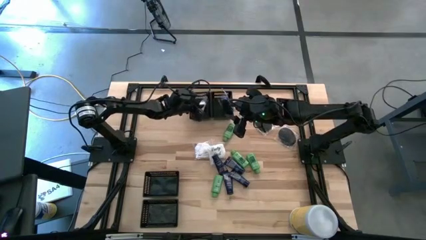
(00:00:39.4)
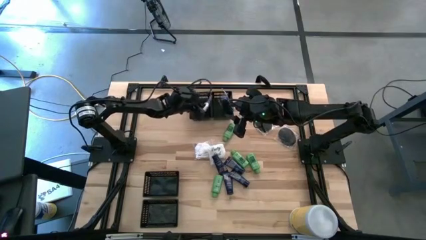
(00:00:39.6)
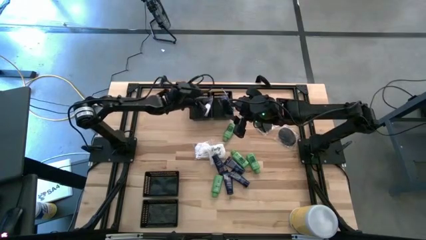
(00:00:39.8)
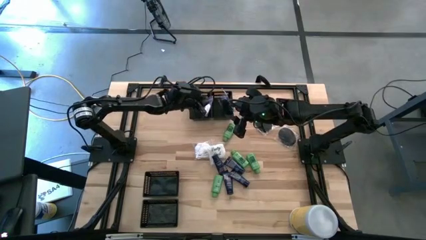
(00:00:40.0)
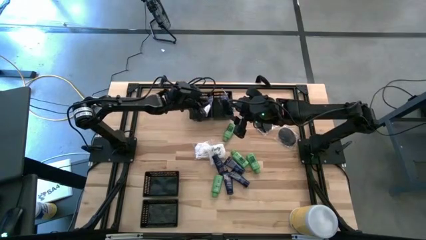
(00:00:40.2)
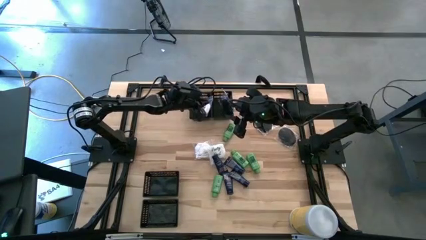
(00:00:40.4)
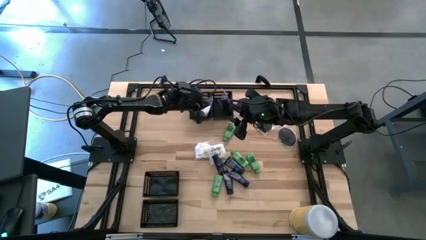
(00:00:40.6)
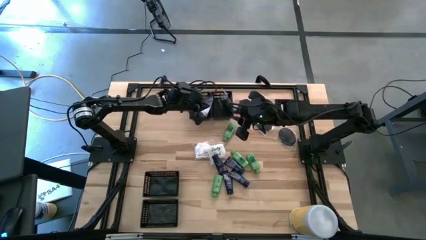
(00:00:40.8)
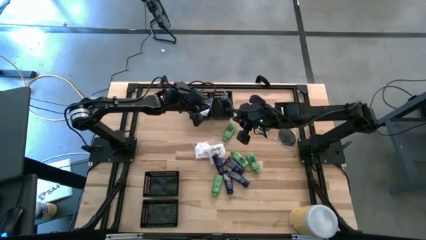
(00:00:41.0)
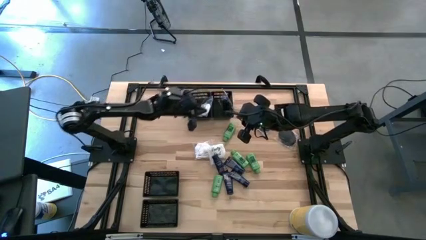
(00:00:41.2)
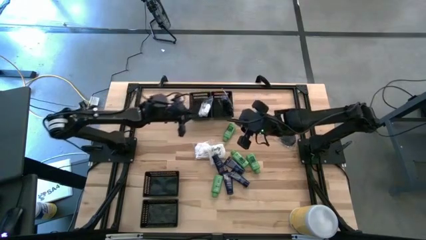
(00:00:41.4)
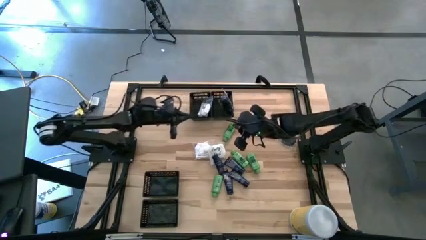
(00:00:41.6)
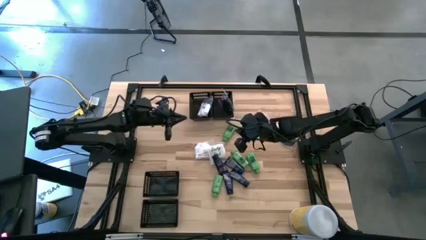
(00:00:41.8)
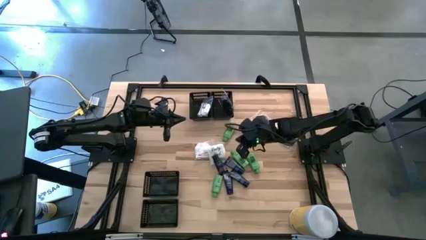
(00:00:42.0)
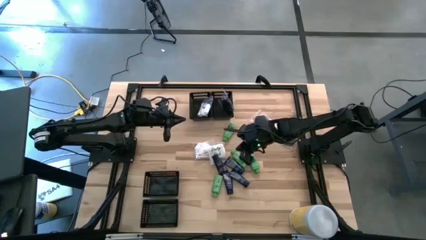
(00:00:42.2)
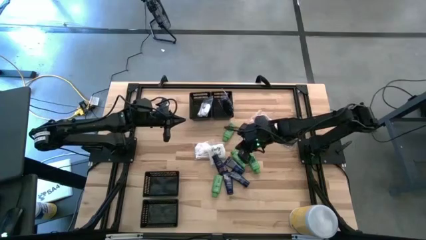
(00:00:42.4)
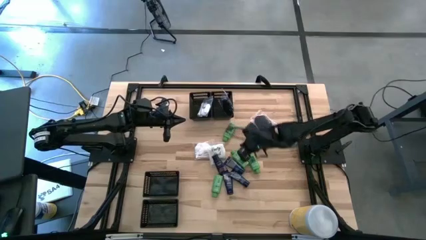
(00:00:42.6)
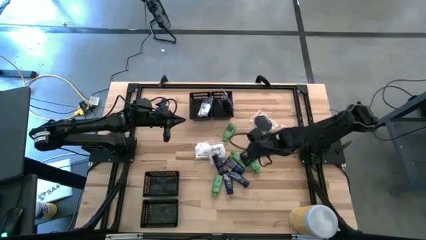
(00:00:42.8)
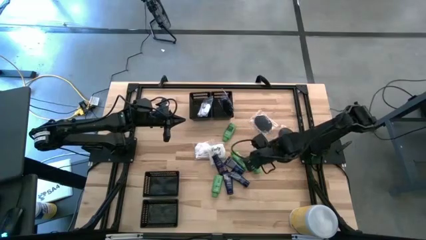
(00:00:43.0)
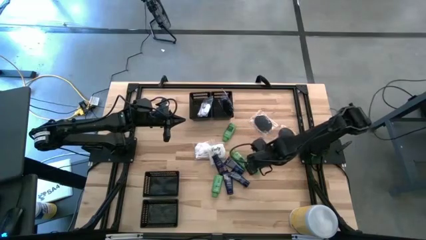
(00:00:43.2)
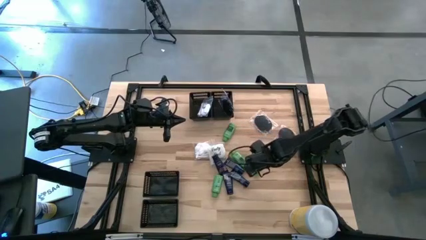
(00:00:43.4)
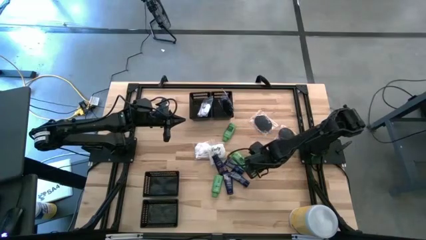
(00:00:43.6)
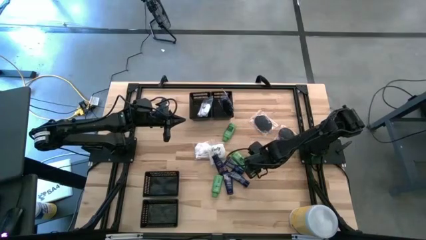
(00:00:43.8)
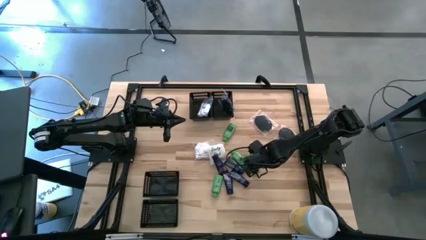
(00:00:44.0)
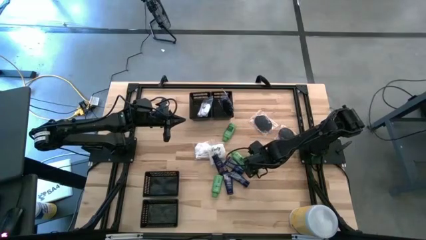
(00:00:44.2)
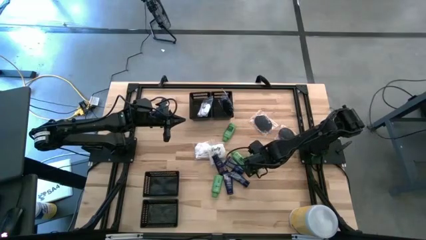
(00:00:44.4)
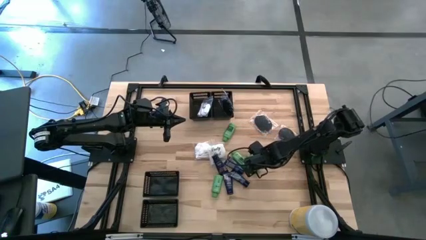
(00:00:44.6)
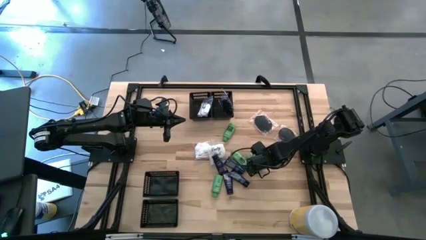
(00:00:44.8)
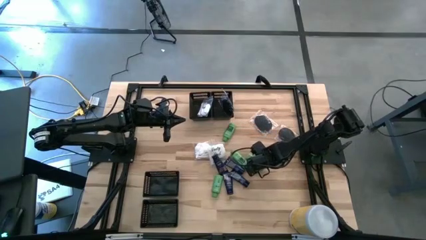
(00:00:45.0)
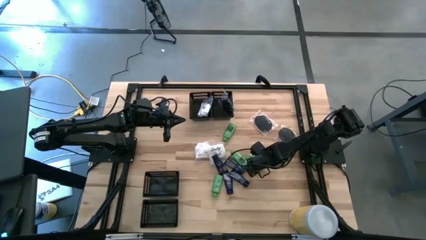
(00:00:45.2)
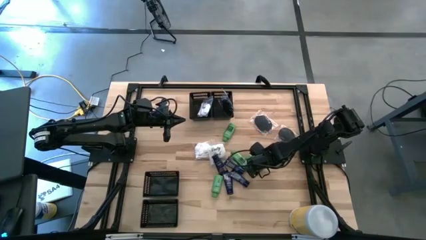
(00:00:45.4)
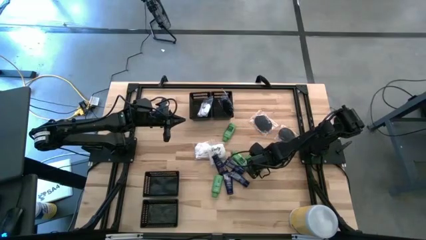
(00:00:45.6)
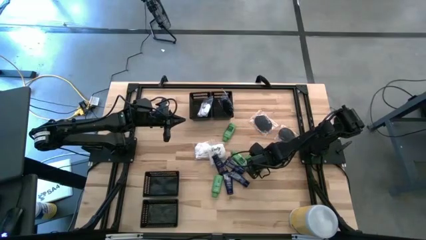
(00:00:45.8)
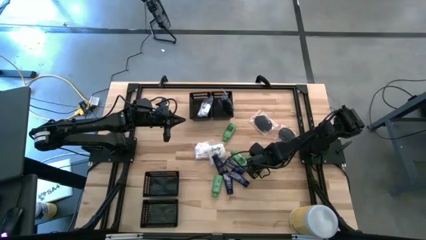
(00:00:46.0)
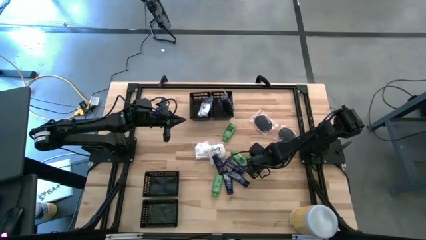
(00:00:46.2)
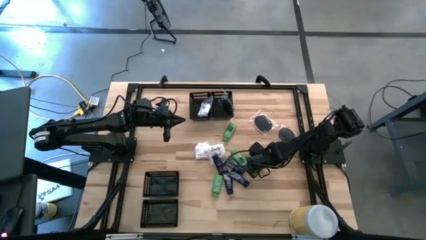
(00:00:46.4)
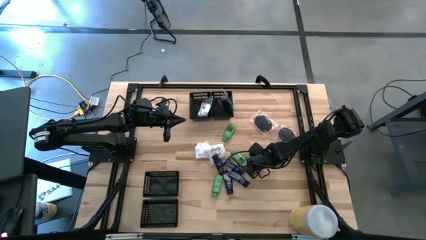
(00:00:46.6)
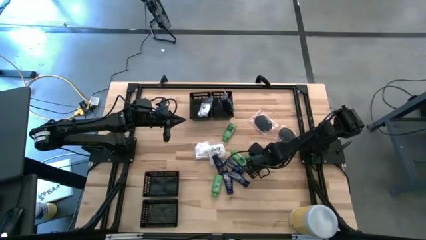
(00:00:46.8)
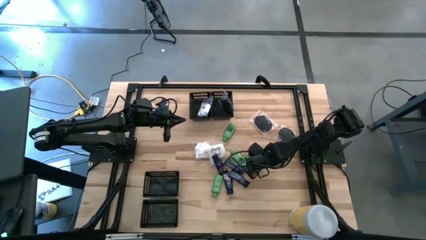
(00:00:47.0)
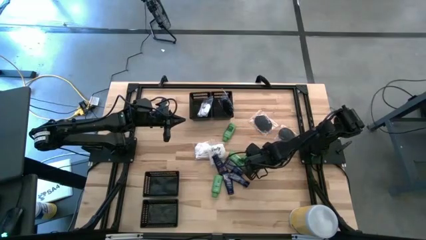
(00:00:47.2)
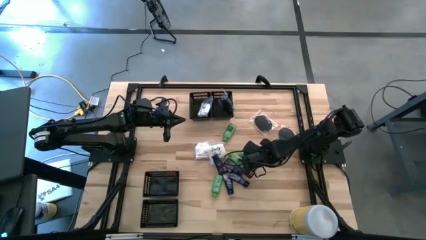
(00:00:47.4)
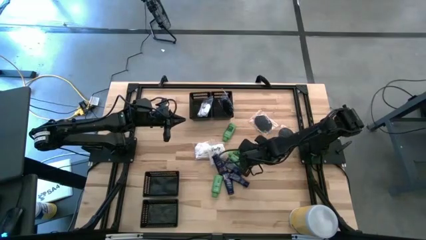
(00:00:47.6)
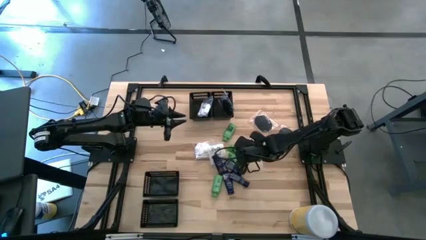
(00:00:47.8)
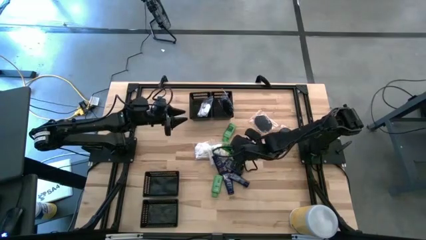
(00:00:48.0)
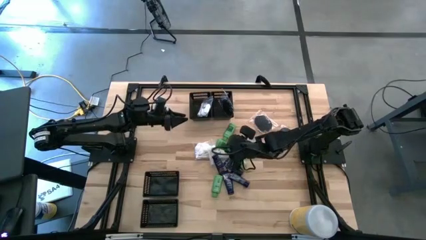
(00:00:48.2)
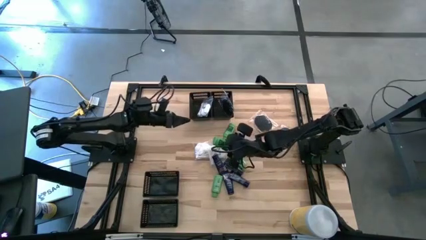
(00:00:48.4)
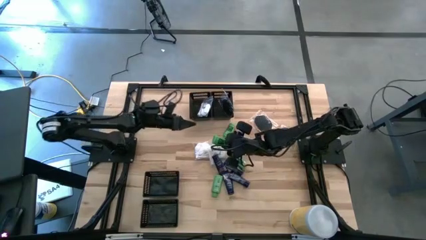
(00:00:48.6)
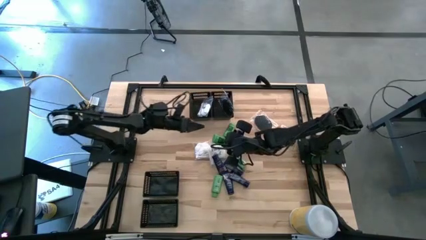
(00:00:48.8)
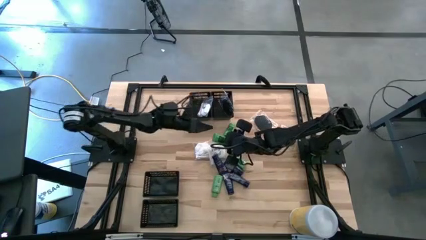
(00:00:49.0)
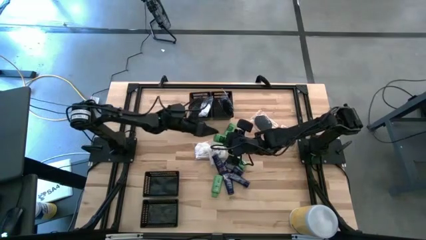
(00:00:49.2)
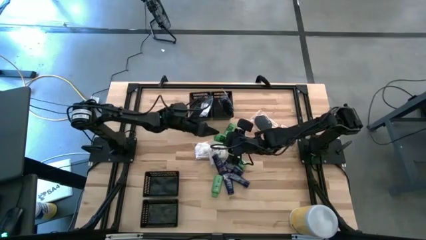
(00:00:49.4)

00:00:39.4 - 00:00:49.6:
Task: Pick & Place Travel size toiletries
Put the green shampoo into the middle left basket

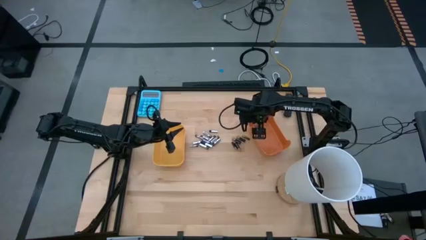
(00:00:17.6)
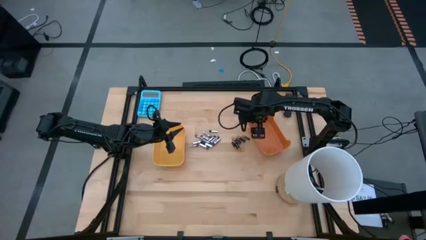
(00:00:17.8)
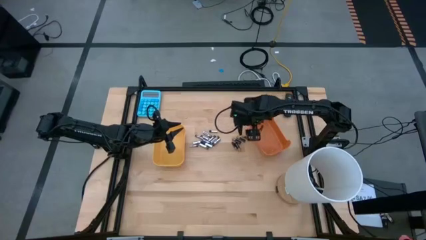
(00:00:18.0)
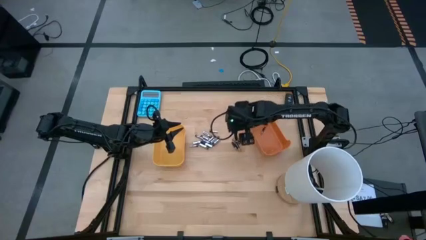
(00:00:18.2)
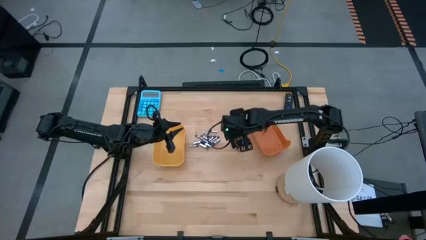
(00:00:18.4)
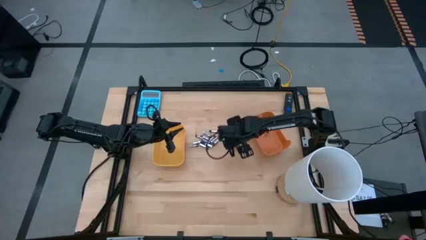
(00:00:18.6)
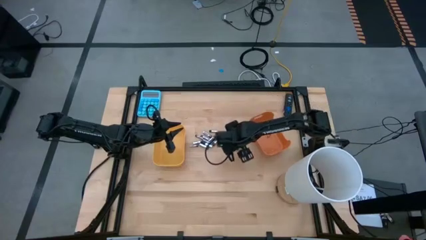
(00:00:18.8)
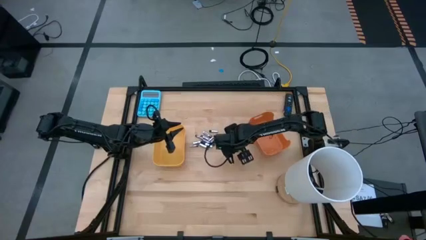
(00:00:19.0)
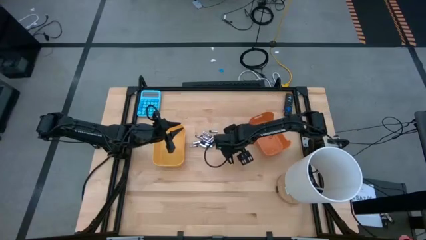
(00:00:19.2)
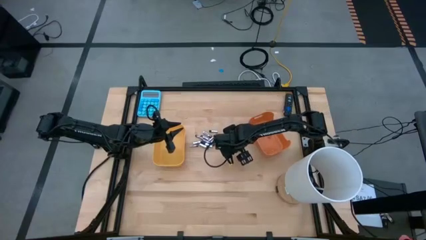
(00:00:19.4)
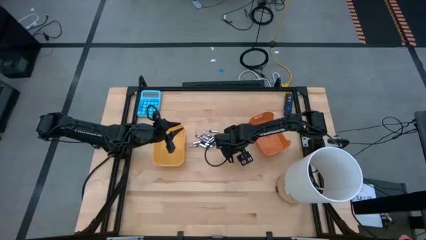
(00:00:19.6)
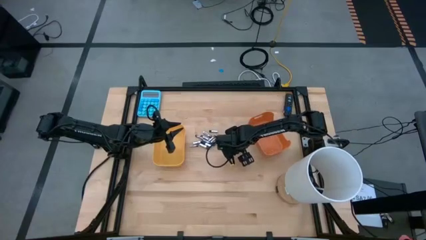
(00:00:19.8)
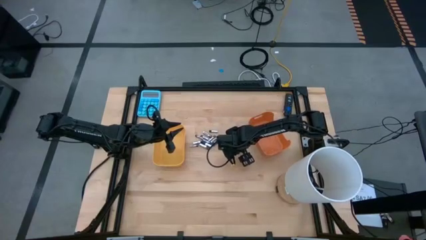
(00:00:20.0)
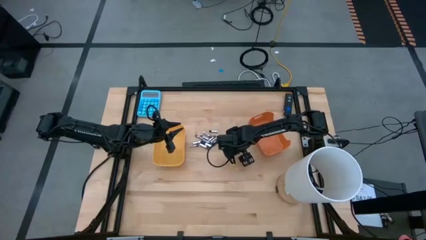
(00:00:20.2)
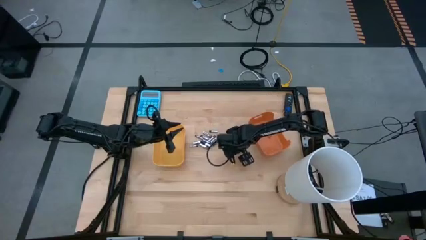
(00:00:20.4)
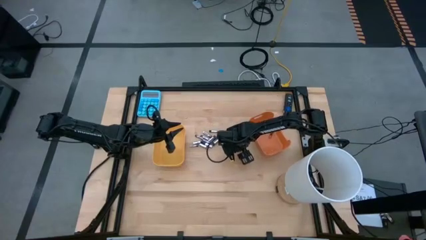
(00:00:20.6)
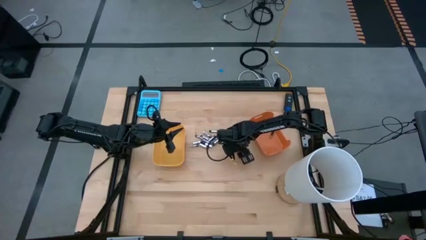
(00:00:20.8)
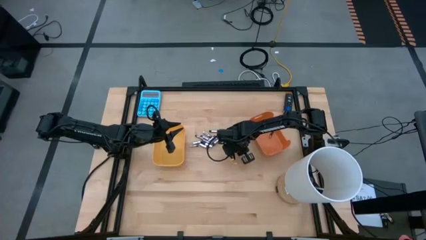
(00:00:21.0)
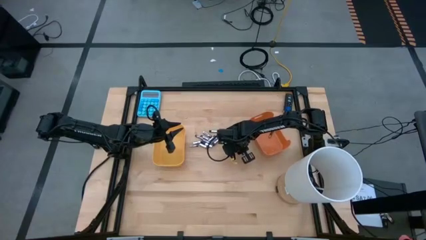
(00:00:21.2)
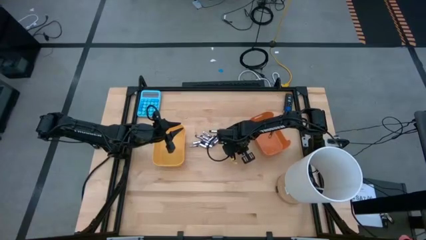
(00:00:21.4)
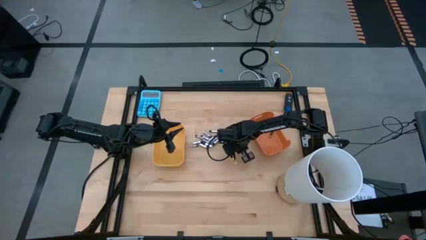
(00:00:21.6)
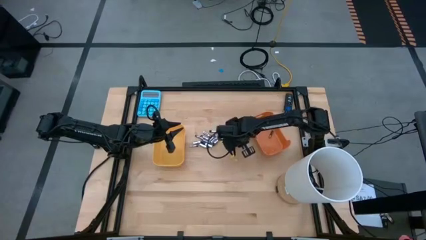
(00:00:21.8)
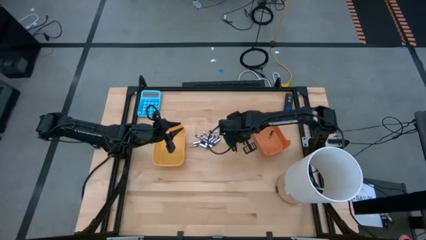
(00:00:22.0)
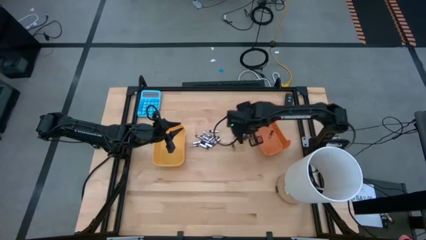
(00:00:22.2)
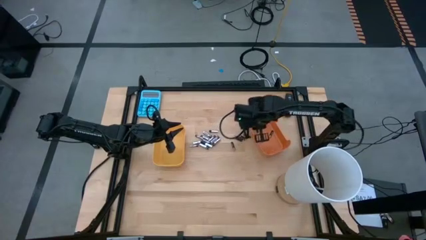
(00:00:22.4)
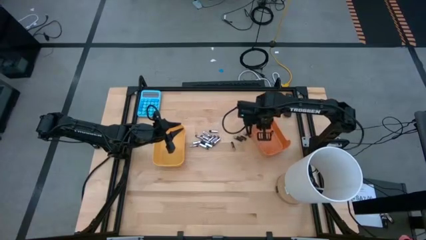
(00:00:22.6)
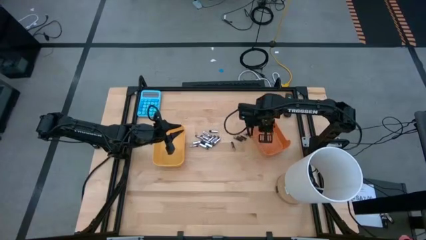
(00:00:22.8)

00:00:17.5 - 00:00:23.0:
Task: Sort batteries
Put the black battery into the orange bin

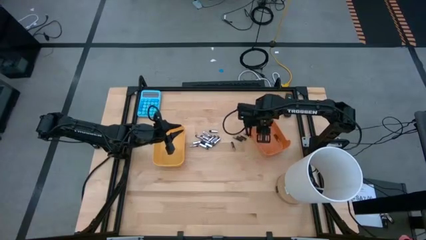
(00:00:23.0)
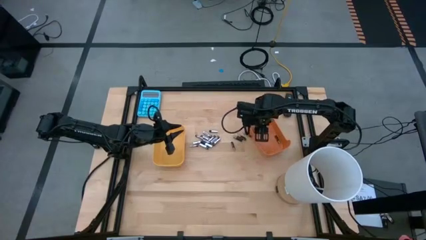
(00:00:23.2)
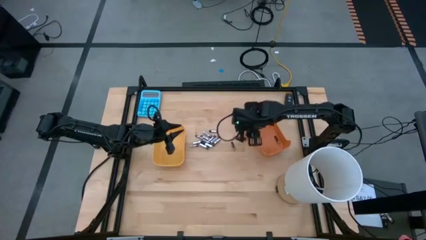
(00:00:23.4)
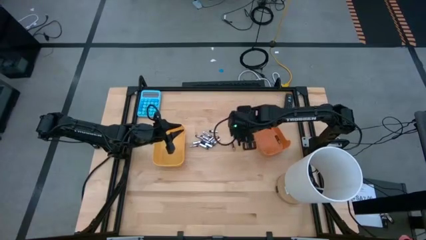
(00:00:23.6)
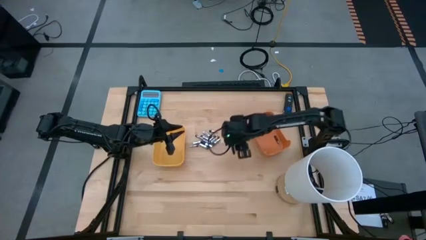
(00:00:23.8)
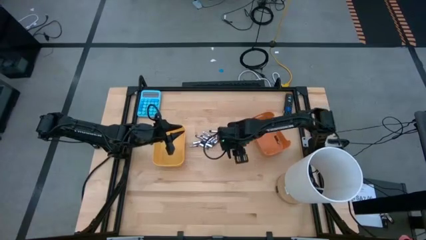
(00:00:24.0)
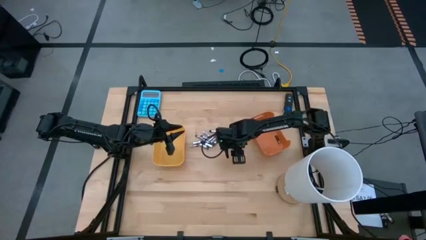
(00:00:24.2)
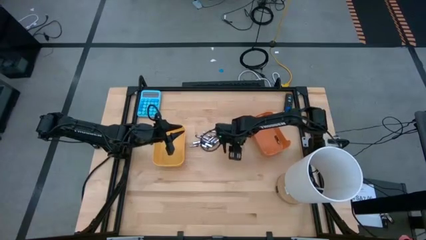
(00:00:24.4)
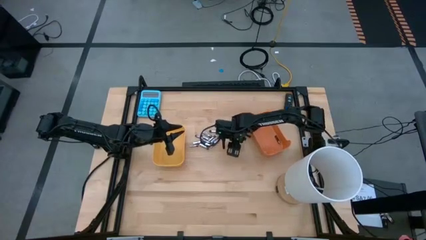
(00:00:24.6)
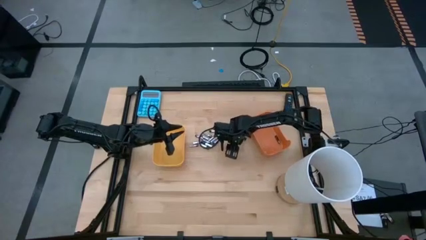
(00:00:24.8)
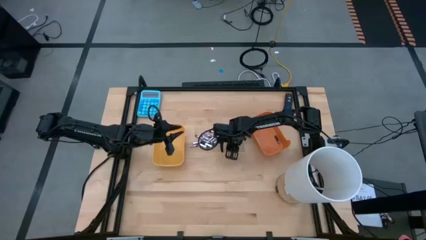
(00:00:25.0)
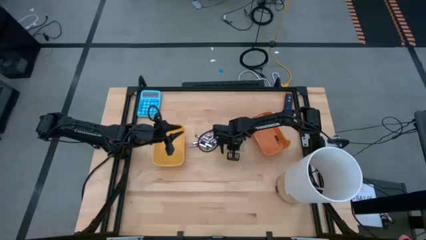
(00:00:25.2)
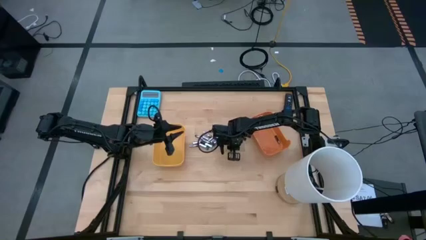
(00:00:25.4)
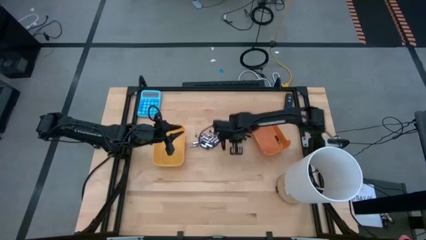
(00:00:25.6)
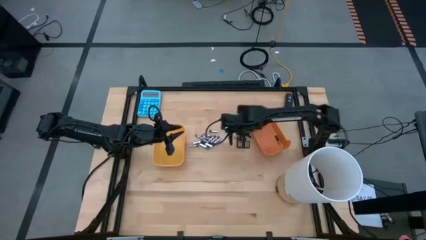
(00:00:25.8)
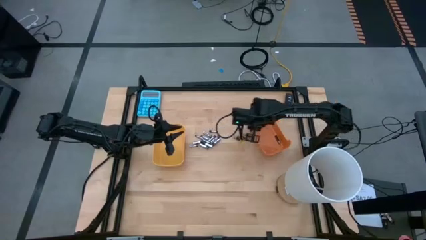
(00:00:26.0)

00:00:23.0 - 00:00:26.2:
Put the black battery into the orange bin
